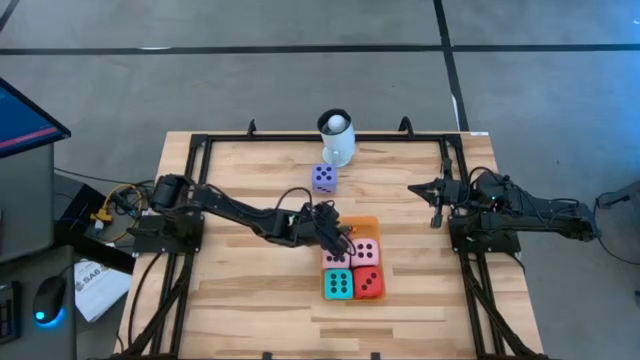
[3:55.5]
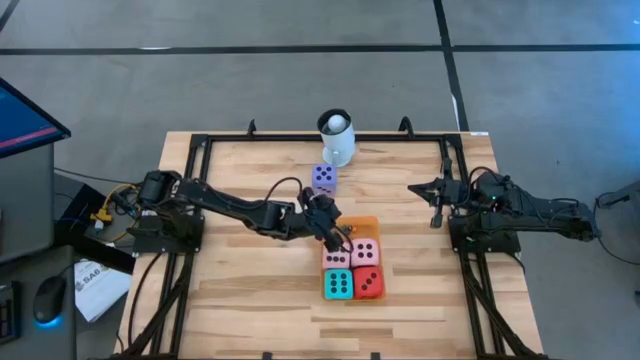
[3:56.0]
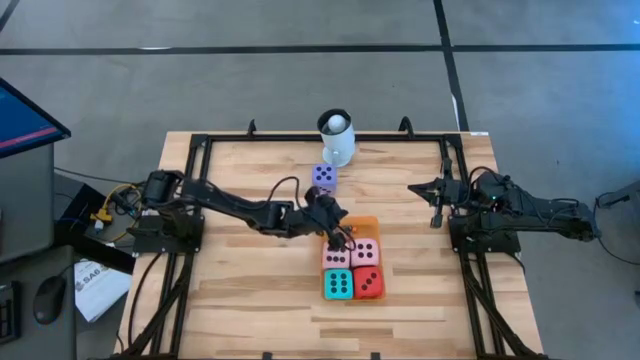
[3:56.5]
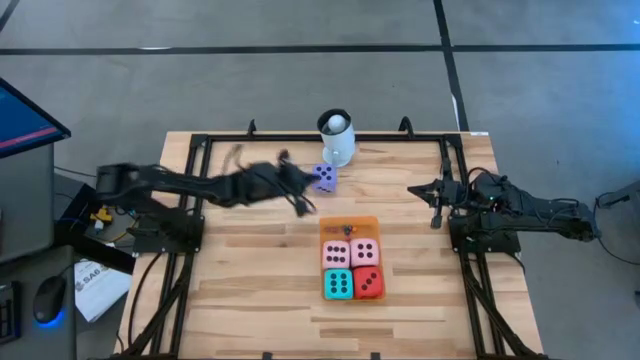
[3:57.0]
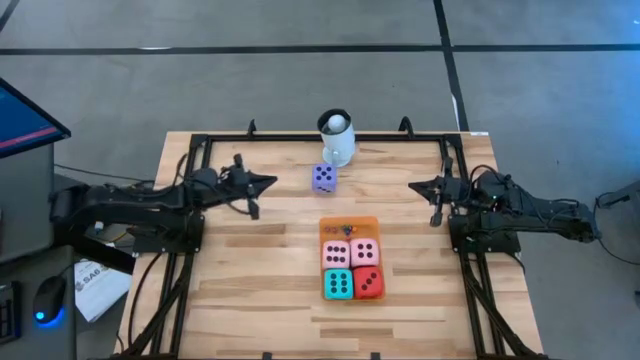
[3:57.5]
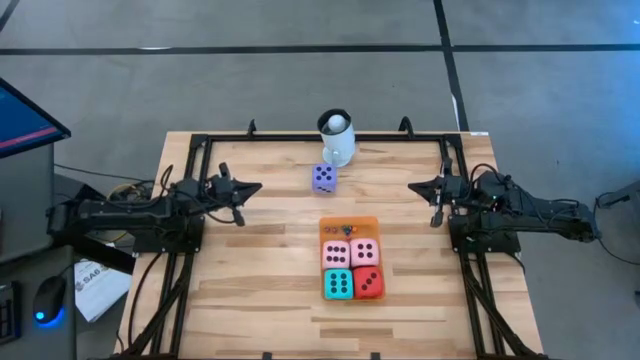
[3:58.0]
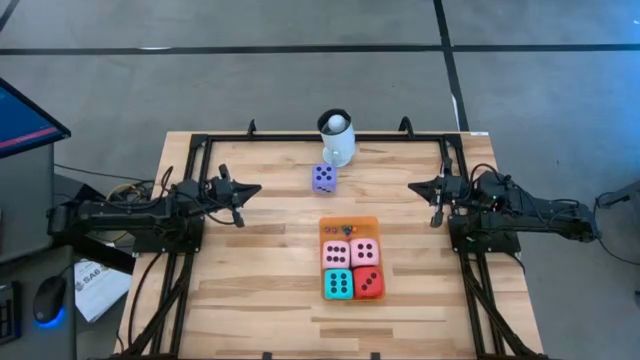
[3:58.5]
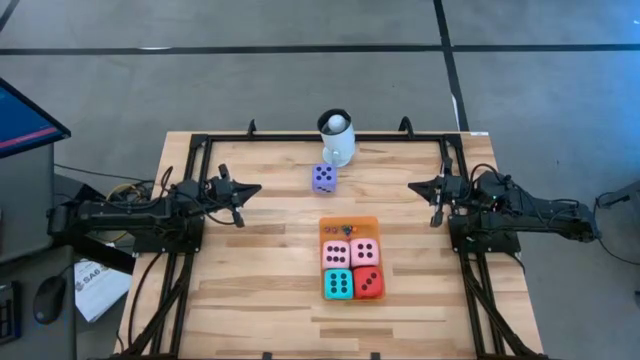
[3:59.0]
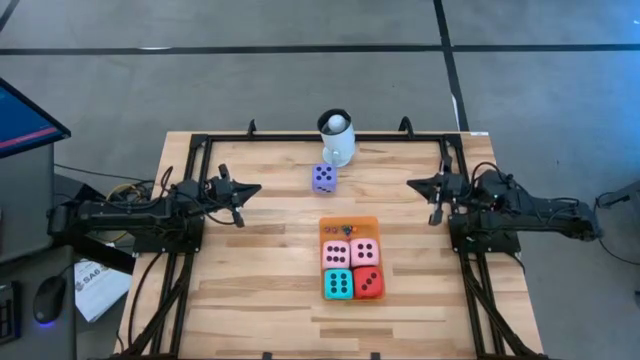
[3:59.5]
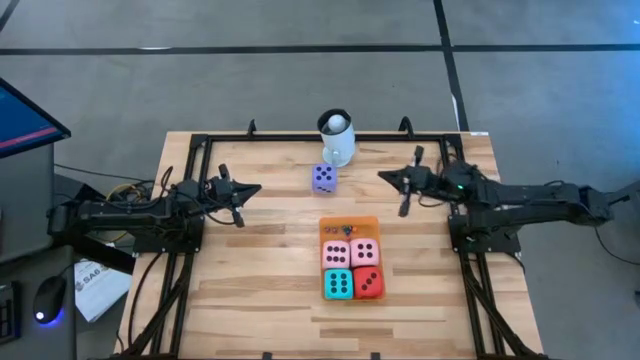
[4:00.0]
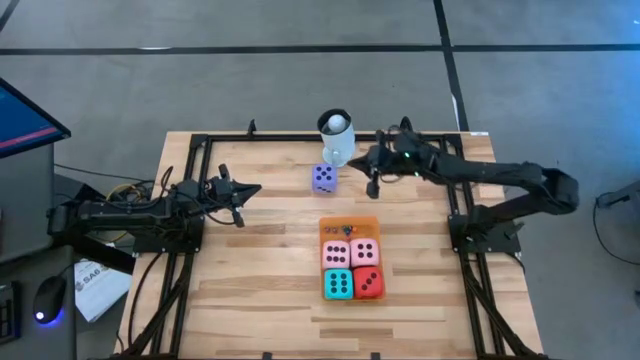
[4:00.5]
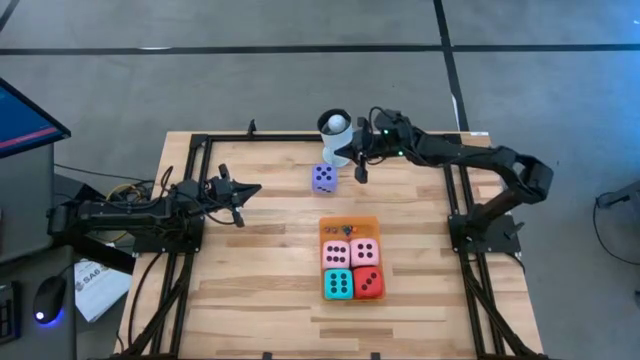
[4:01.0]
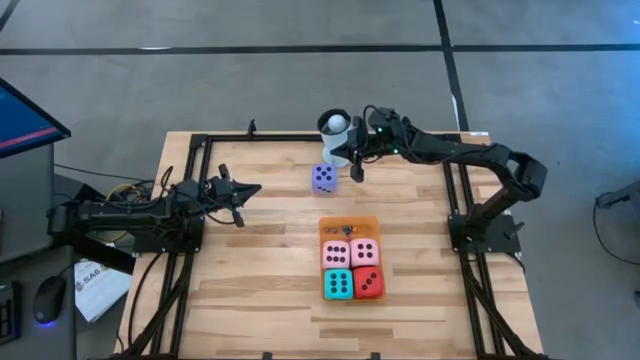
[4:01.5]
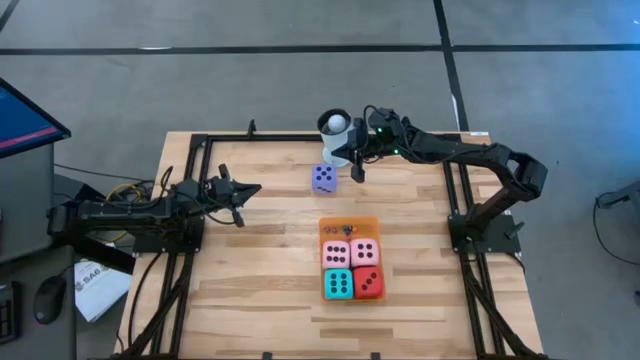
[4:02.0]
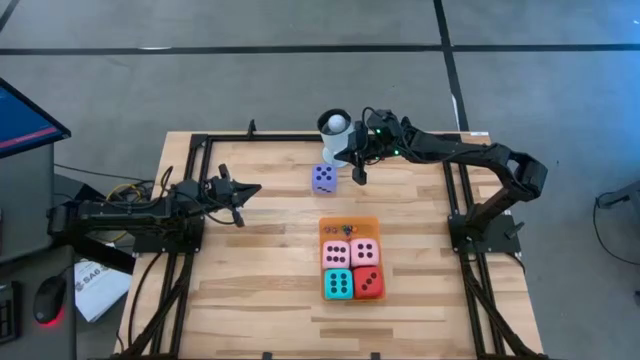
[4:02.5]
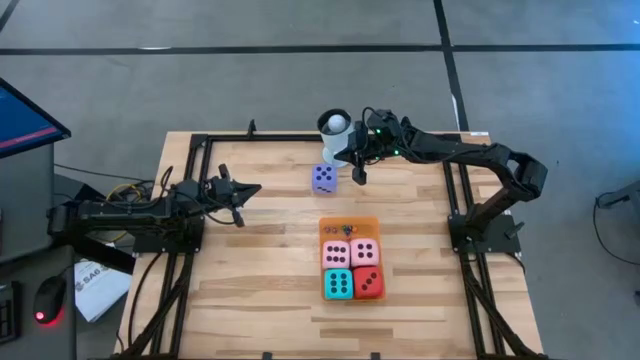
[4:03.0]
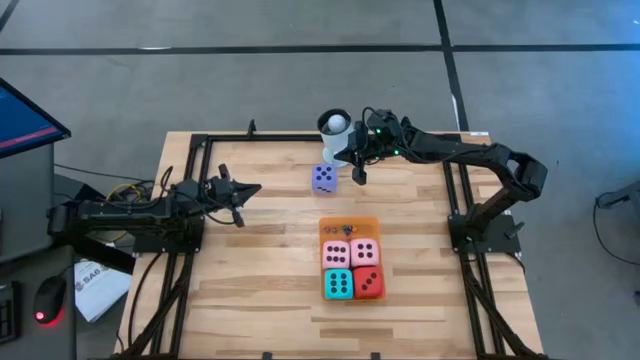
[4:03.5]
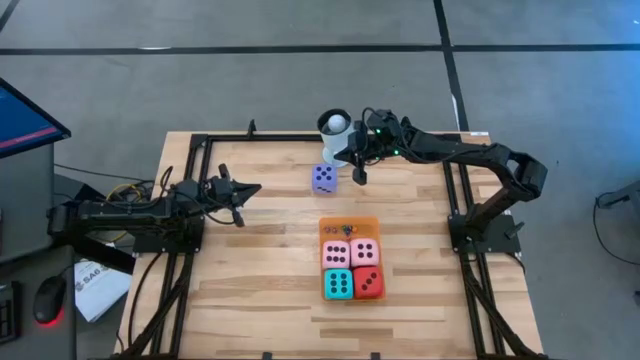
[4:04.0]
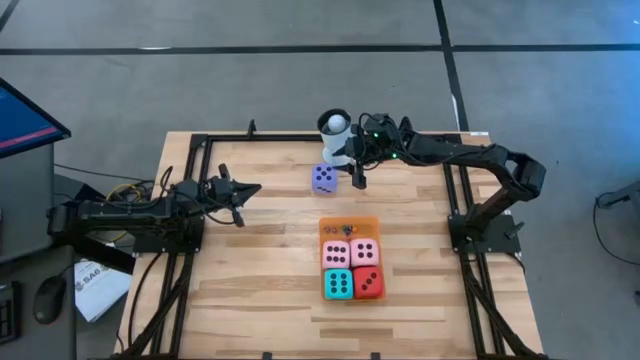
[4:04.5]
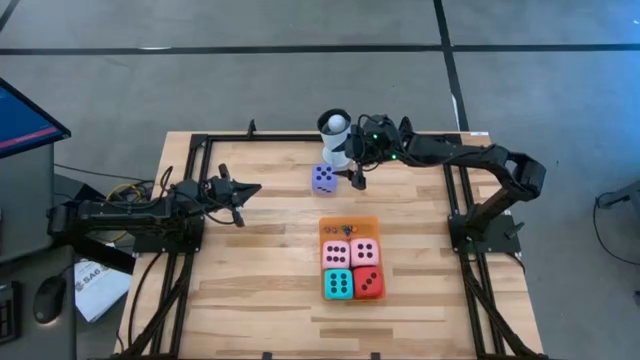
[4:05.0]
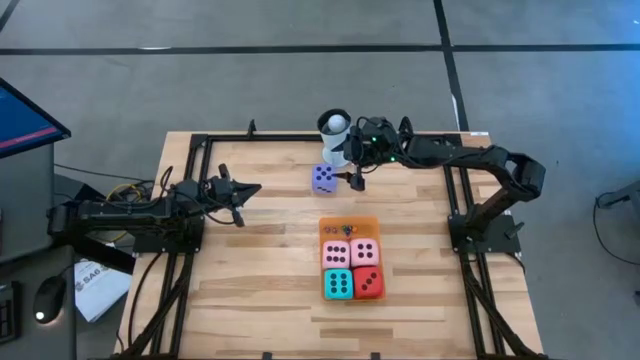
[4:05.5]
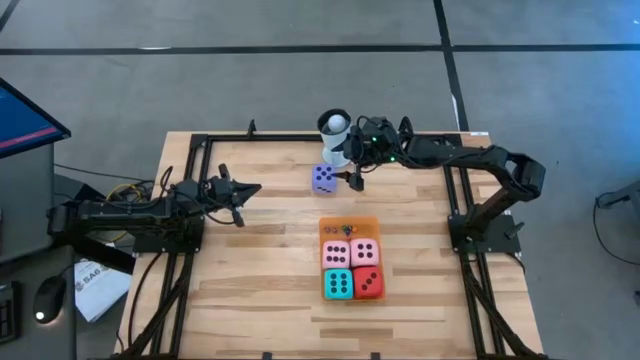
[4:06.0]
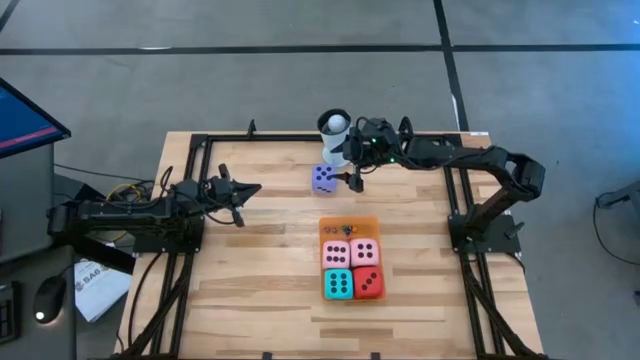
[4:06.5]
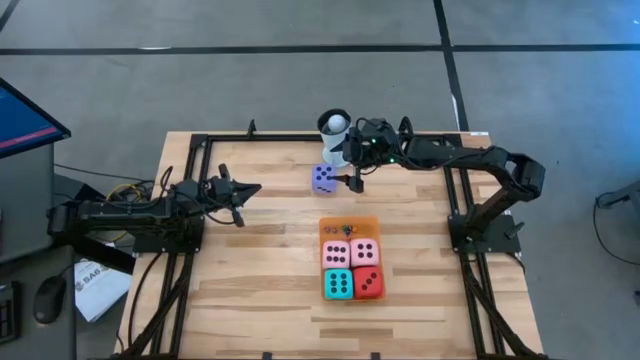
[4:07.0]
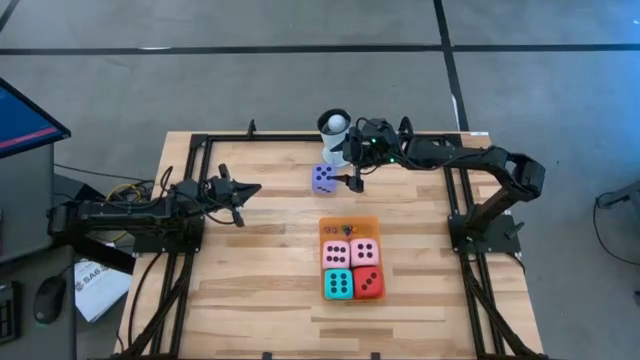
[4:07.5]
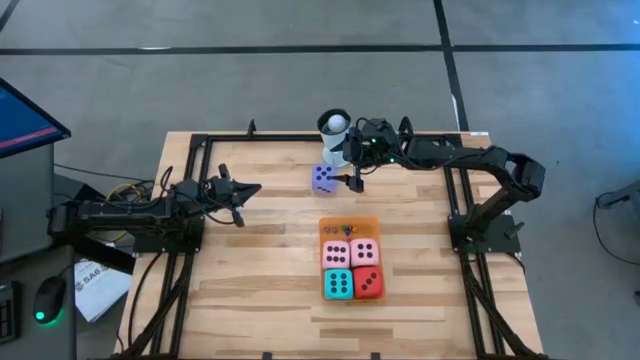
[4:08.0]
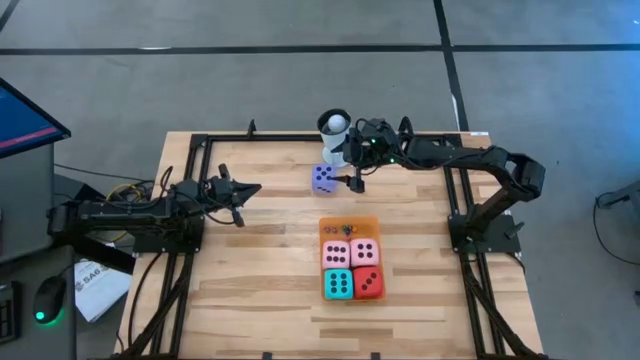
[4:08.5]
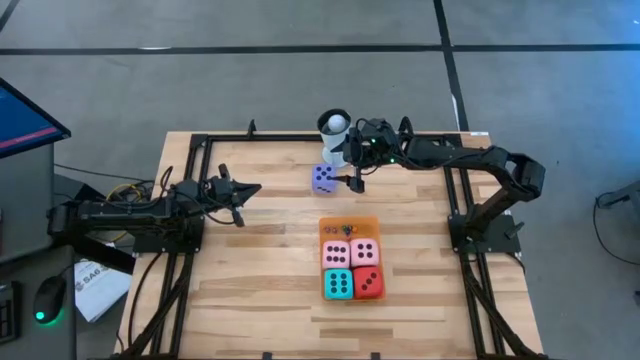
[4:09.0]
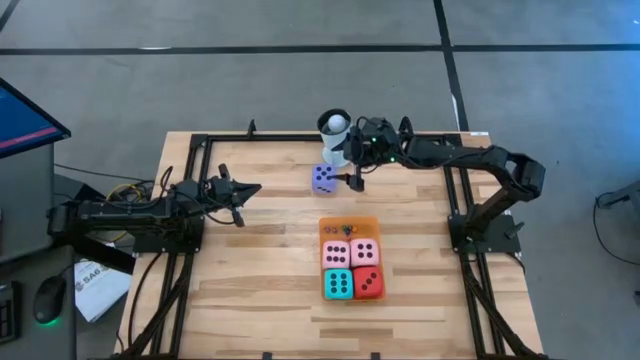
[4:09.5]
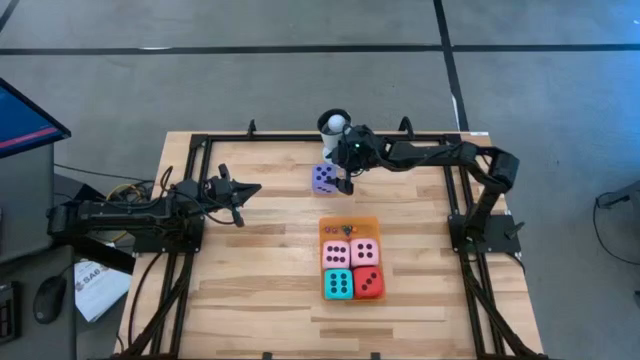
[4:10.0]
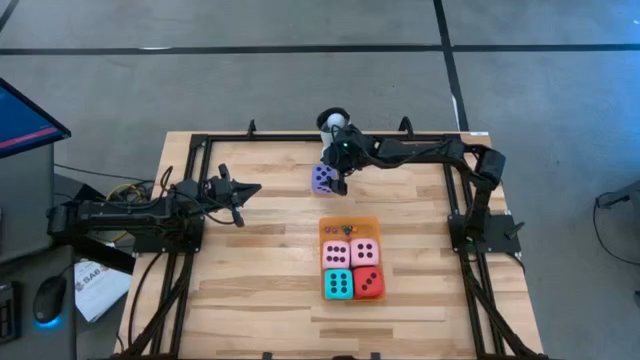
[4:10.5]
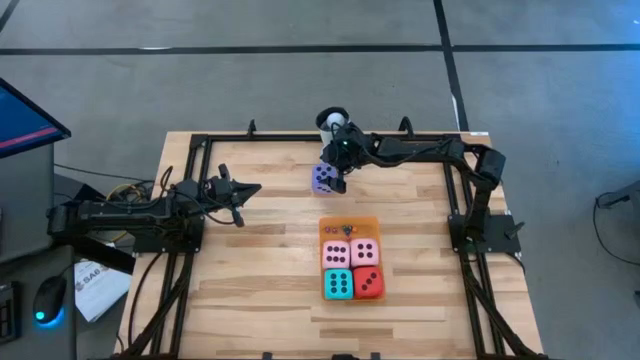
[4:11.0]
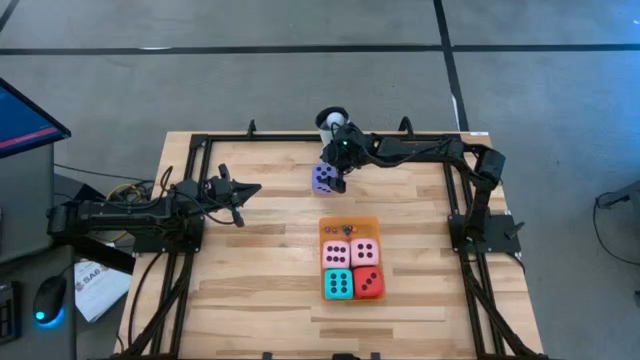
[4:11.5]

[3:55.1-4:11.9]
Task: Pick & Place Dice
Put the large purple dice into the orange bin

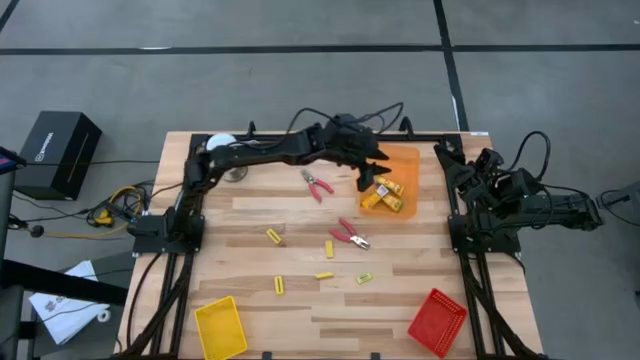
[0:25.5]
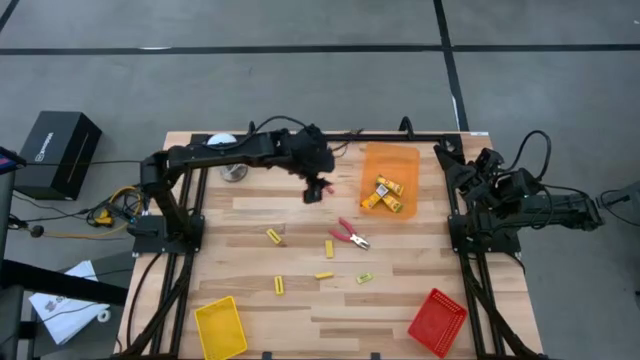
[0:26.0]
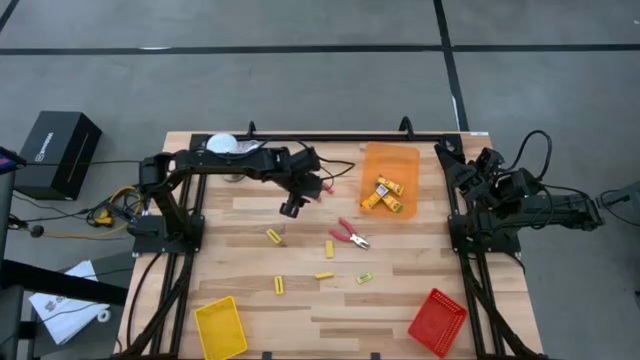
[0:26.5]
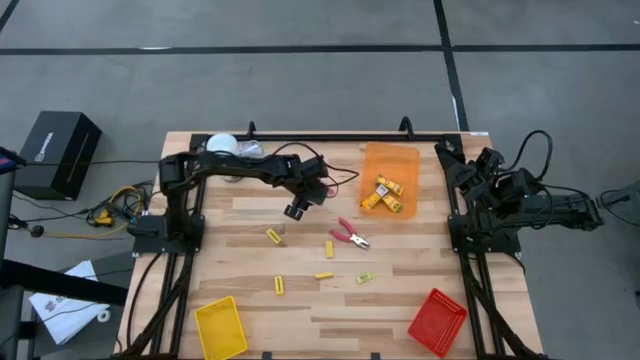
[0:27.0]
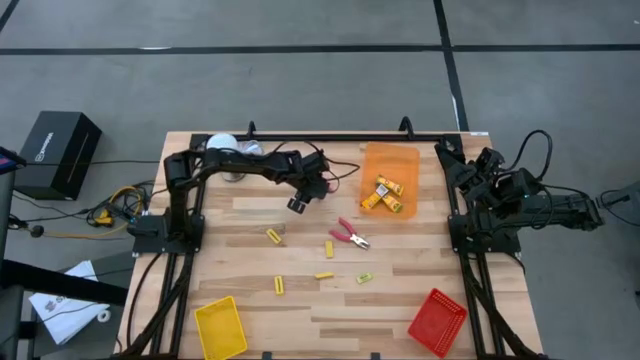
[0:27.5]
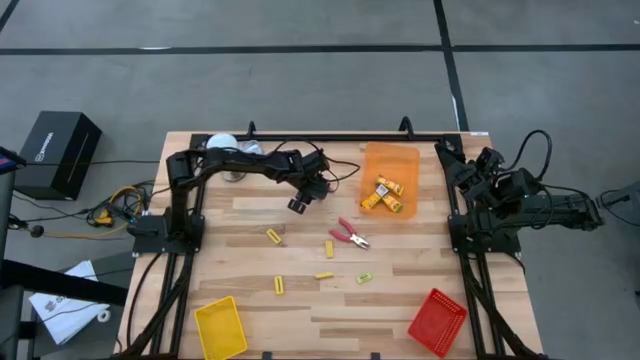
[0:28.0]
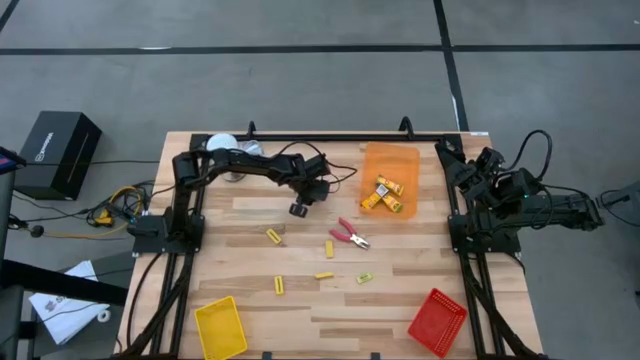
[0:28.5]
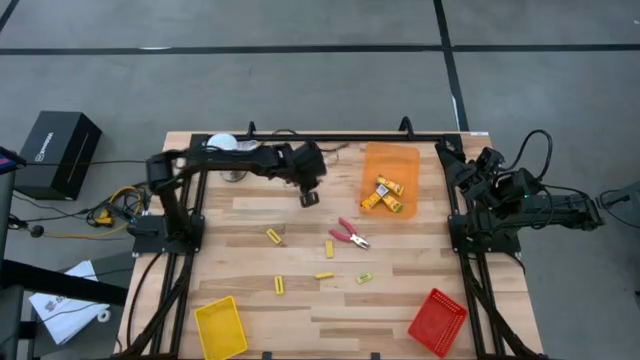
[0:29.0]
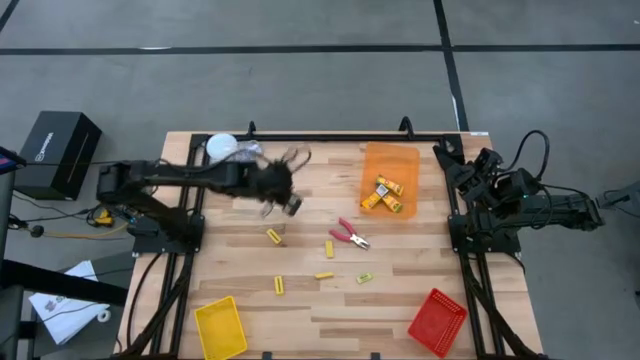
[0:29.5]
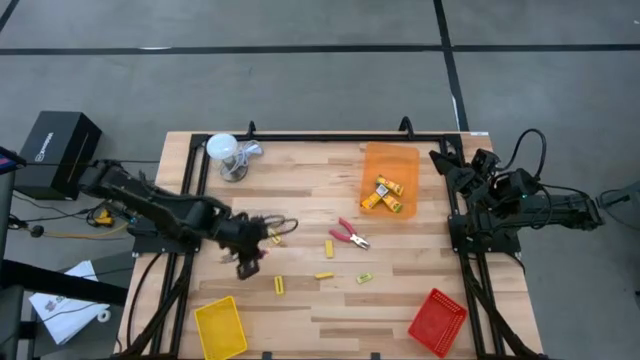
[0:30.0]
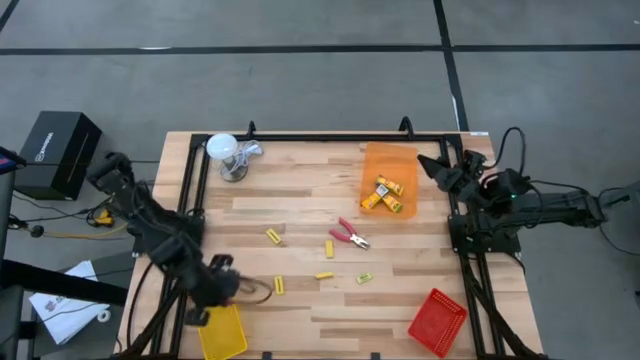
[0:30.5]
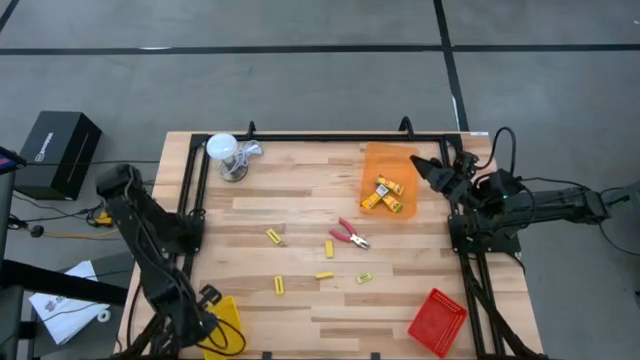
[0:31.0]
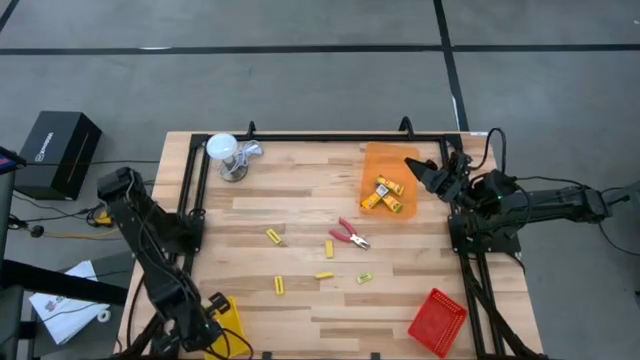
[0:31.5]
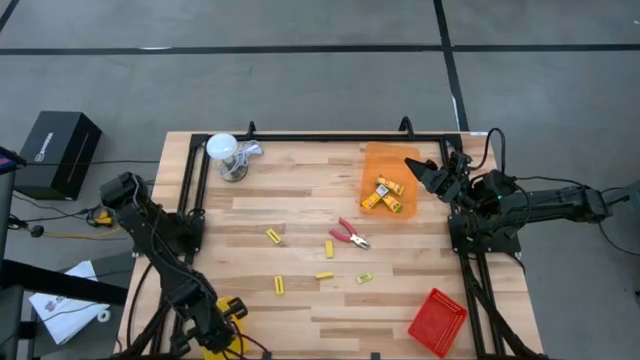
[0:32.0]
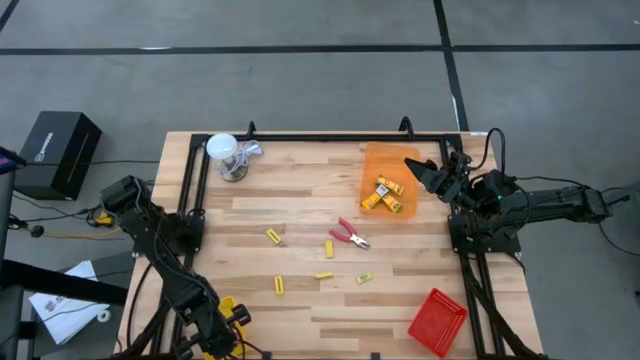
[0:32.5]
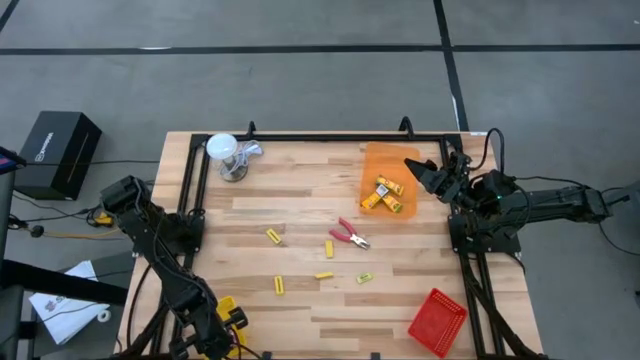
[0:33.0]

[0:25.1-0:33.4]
Task: Pick & Place School Supplies
Put the top pink pliers into the yellow bin
